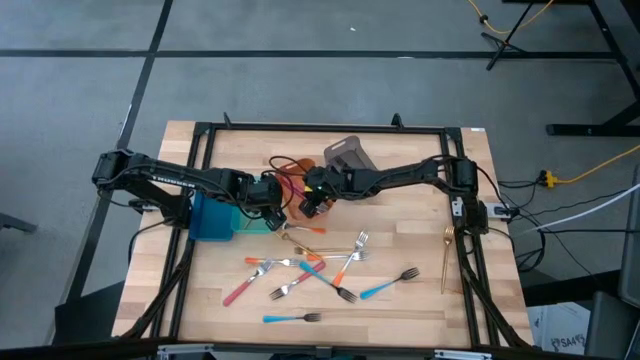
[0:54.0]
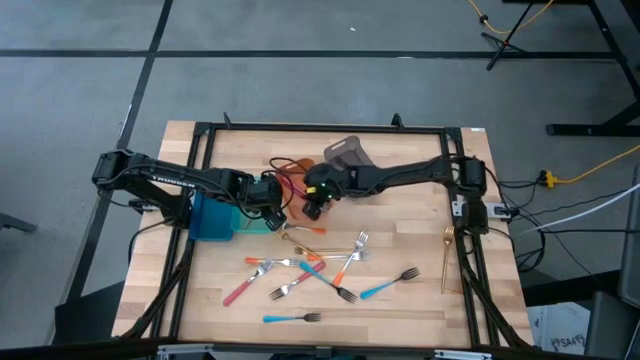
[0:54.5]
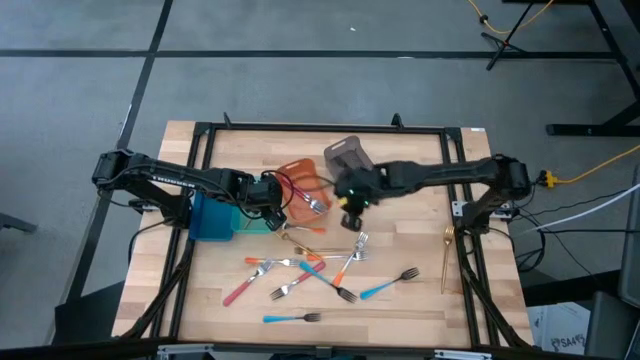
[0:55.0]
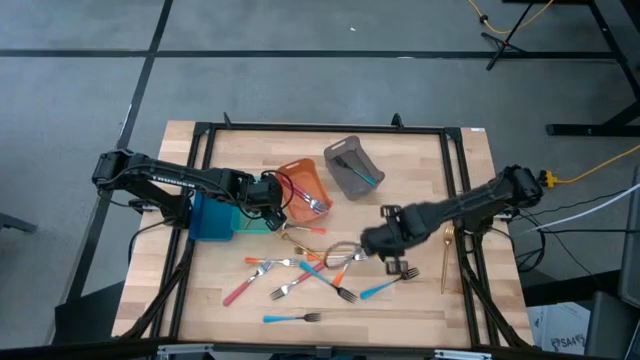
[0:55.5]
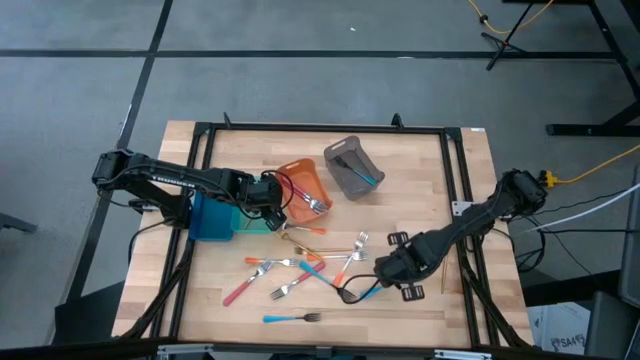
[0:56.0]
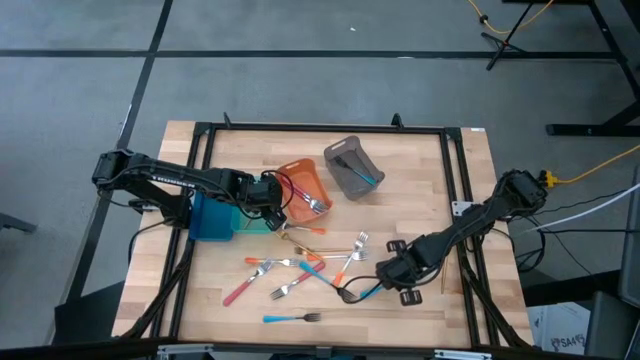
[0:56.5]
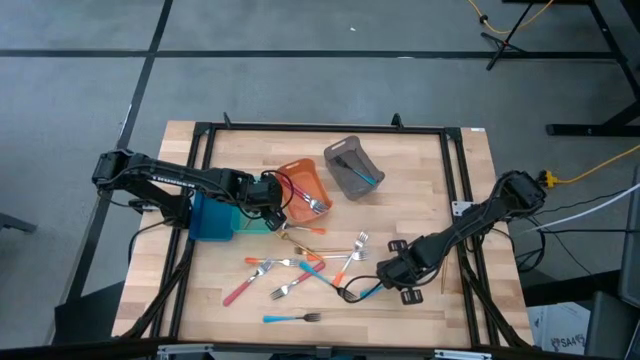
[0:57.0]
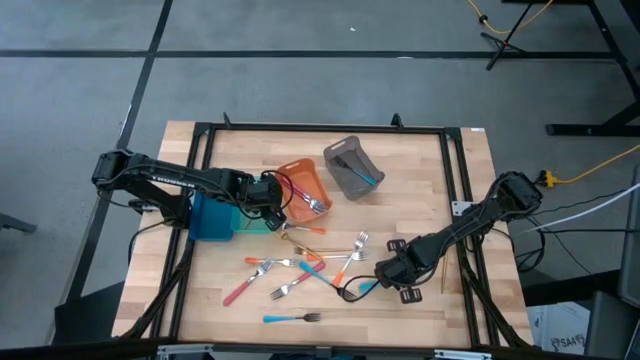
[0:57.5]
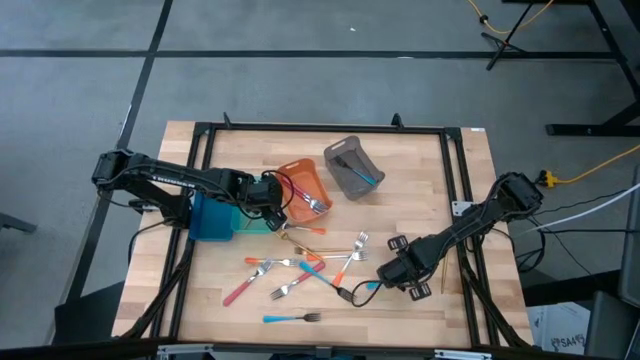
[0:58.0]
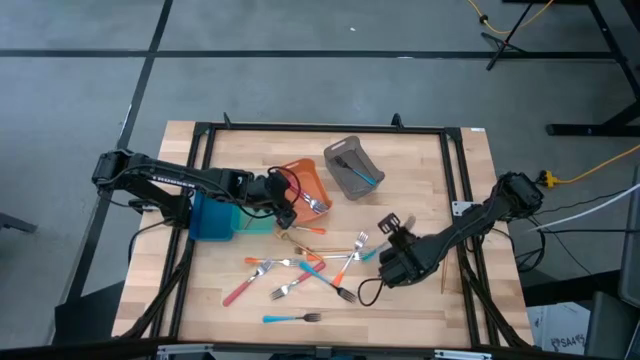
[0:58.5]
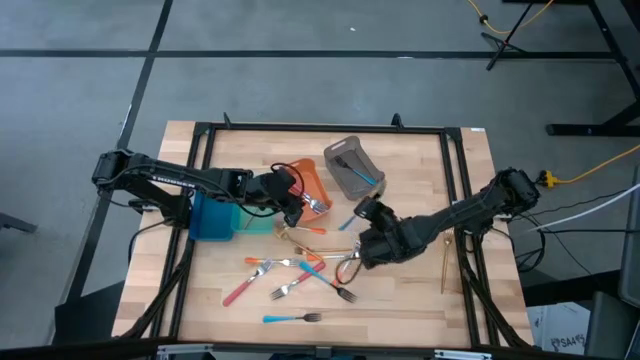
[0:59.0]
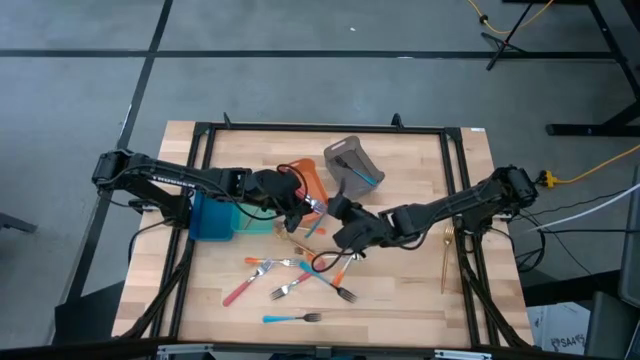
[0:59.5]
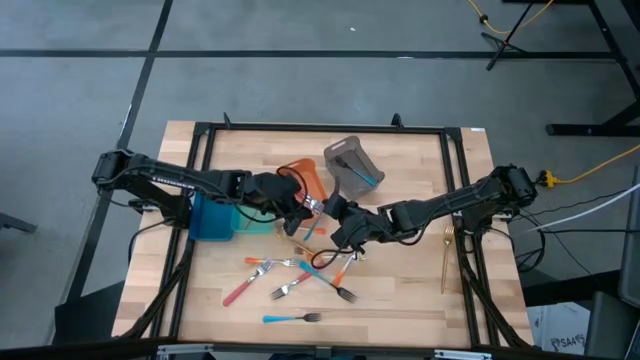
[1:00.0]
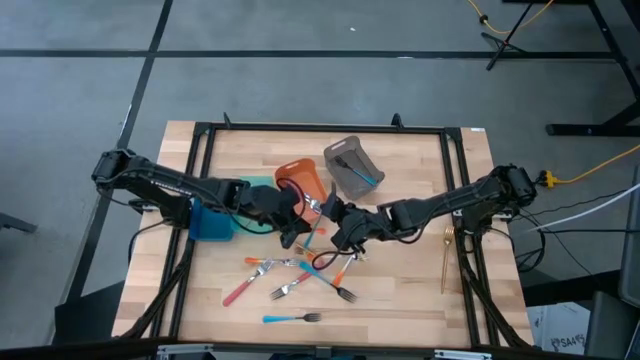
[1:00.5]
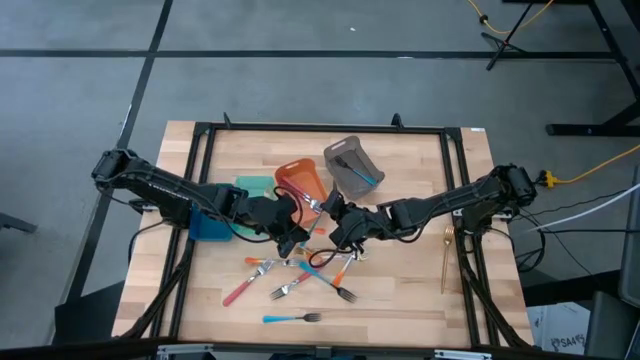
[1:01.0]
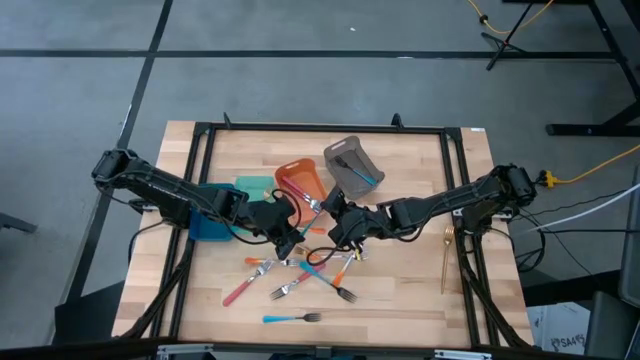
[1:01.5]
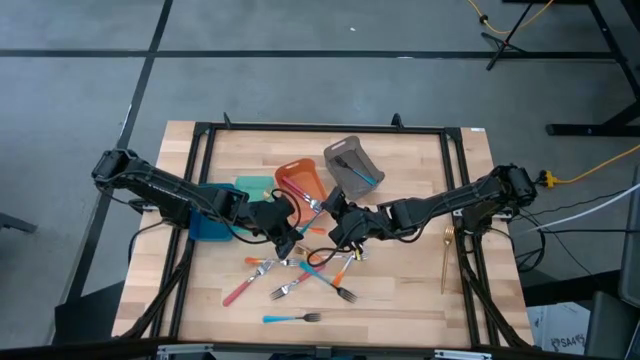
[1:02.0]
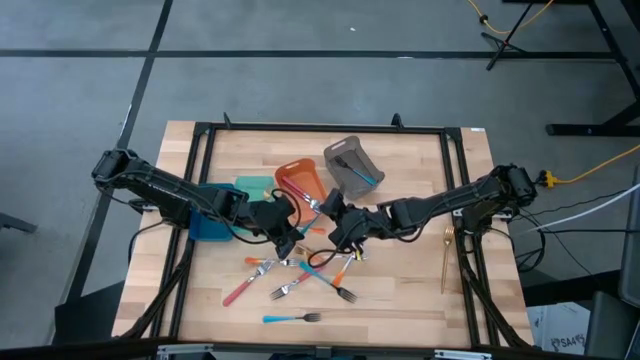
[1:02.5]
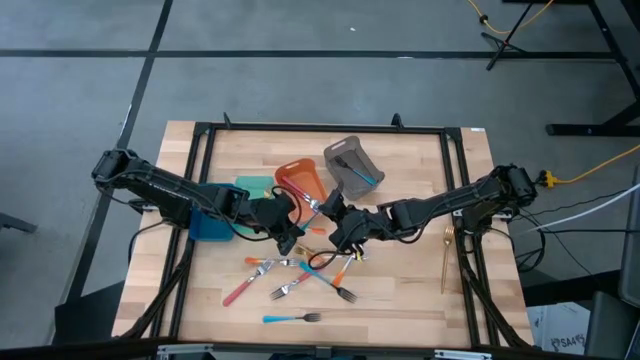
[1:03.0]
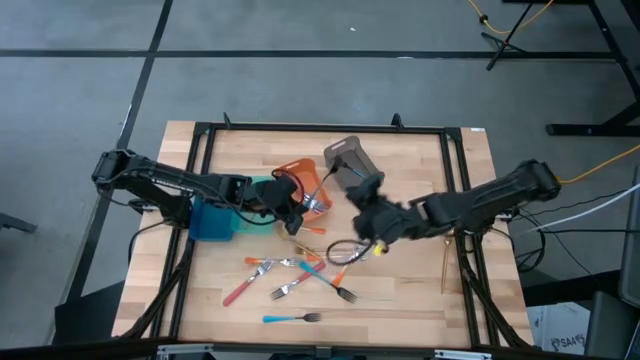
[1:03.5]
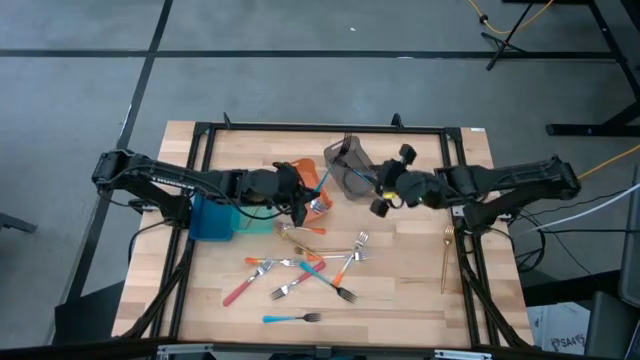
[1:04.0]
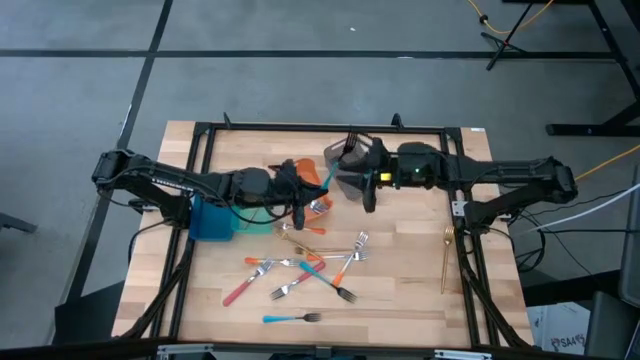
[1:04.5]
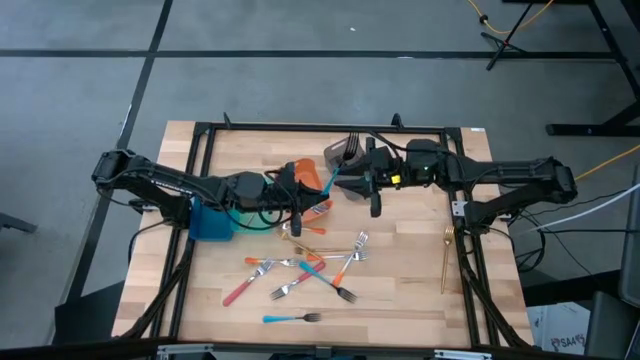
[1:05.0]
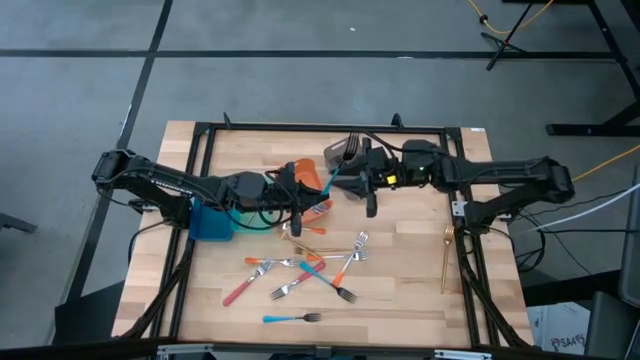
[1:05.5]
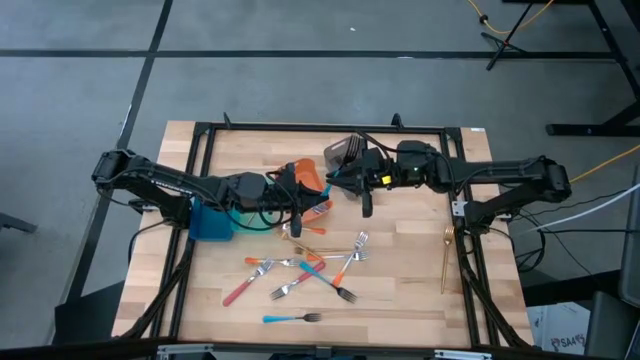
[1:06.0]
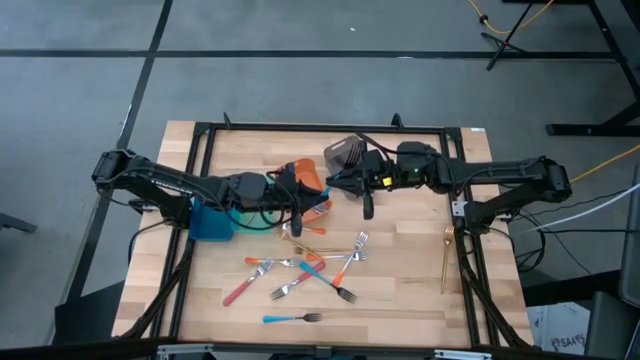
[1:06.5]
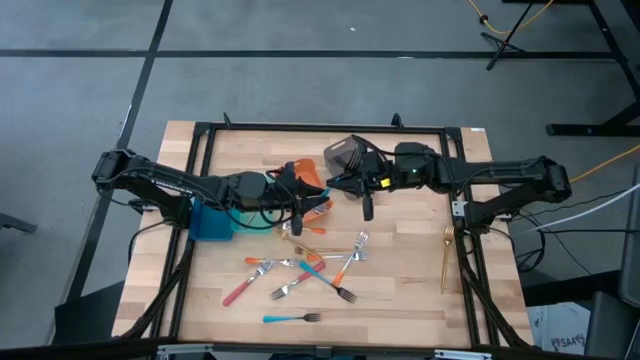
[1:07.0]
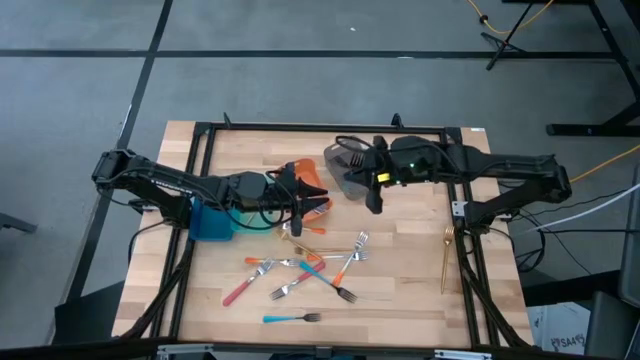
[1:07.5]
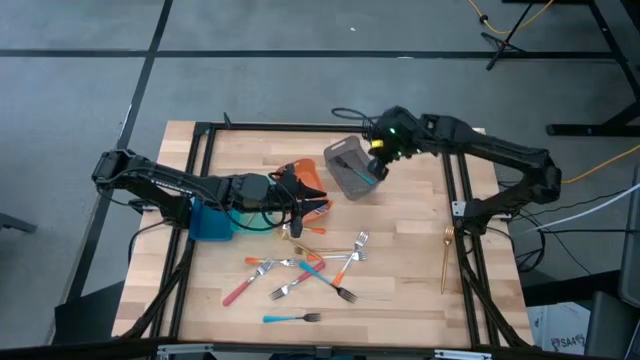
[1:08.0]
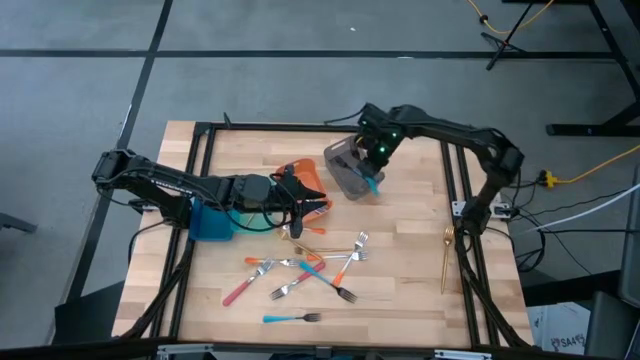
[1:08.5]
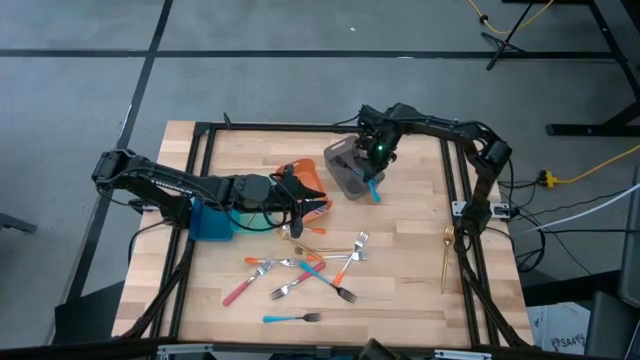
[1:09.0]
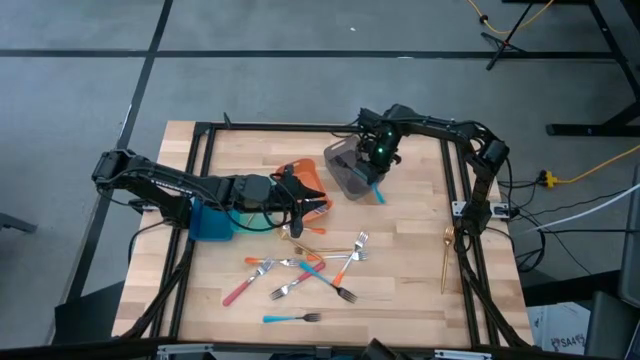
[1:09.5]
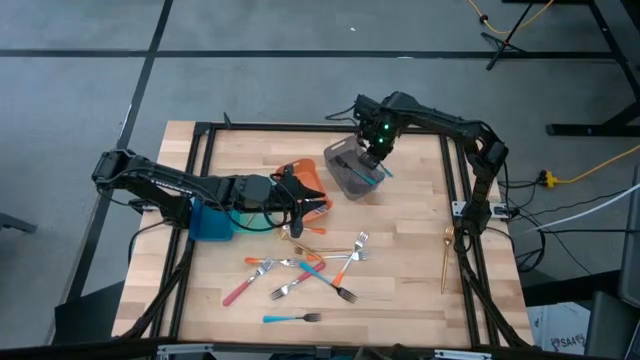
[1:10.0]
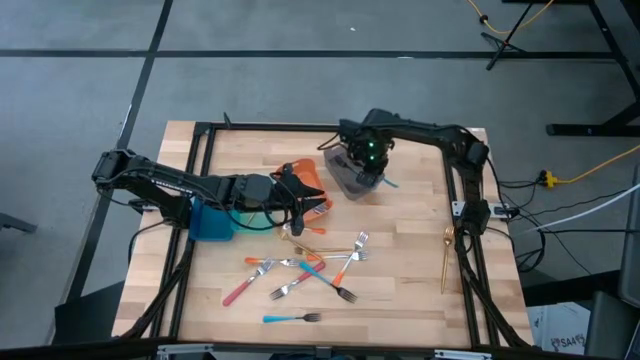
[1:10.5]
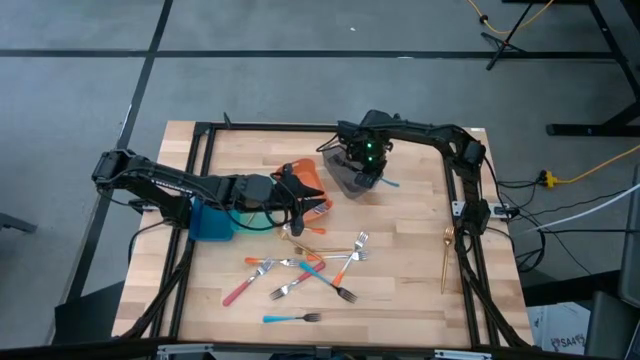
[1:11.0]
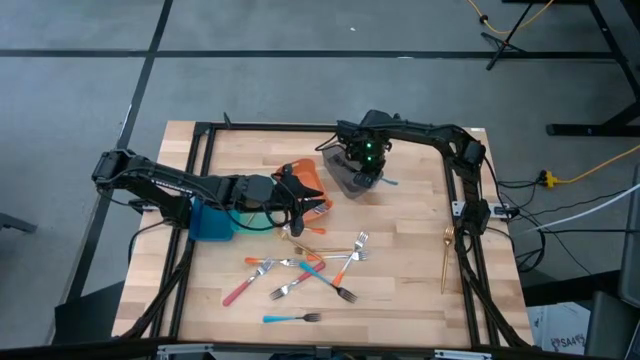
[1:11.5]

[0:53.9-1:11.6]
Task: Sort silverware by color (type)
Put the blue fork into the black bin

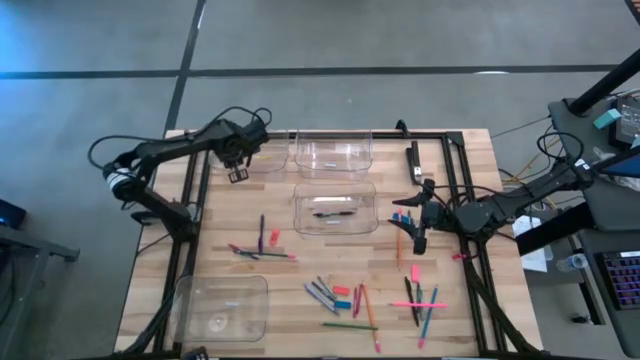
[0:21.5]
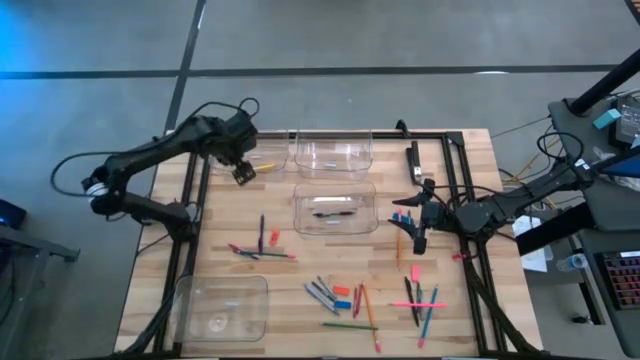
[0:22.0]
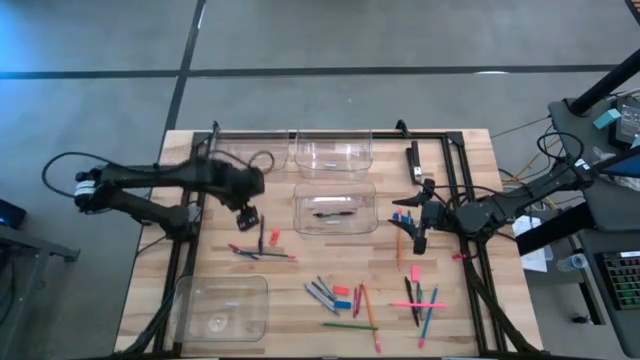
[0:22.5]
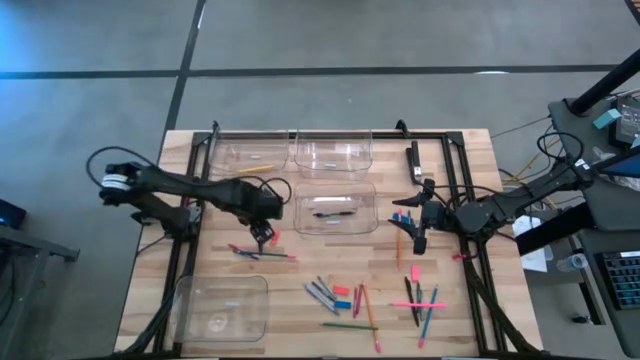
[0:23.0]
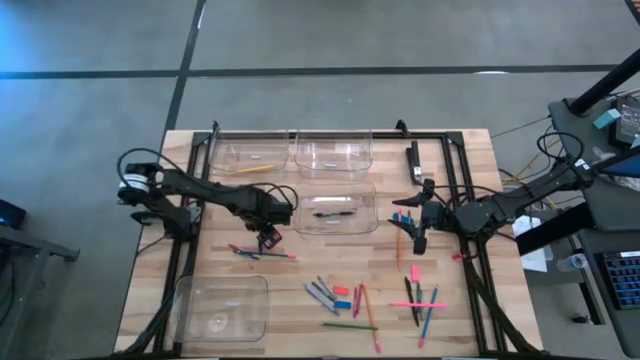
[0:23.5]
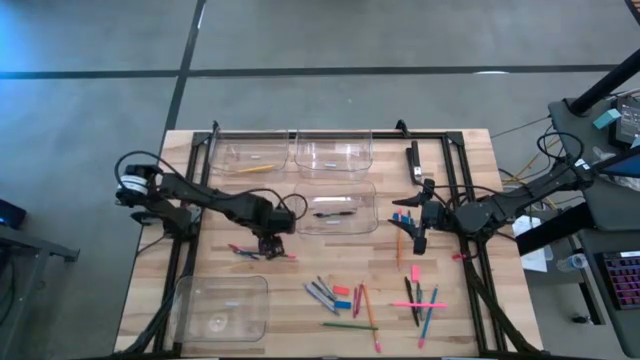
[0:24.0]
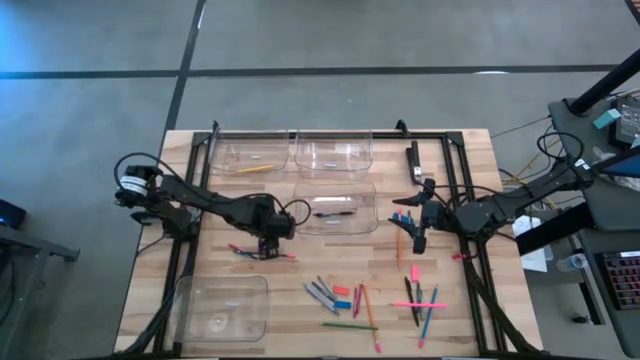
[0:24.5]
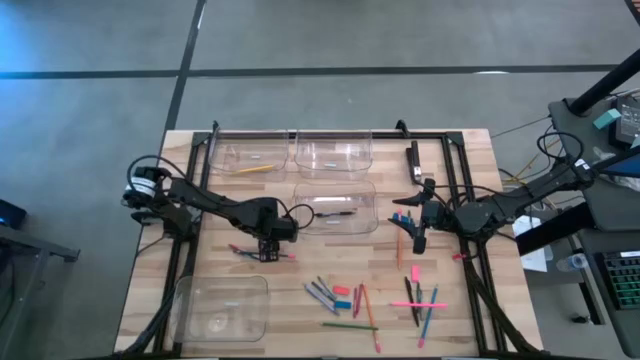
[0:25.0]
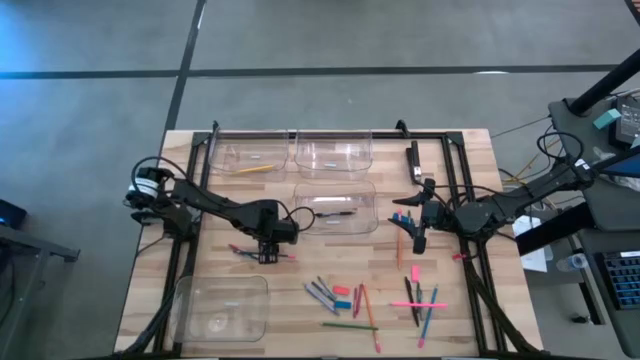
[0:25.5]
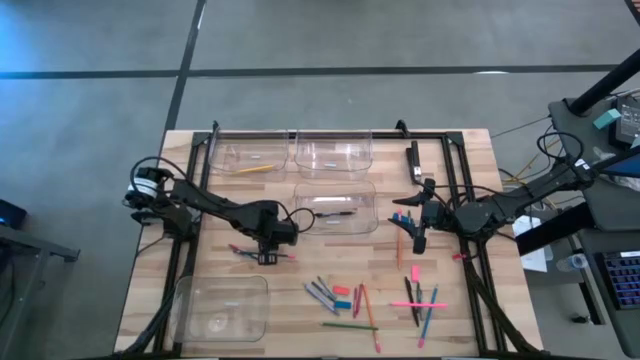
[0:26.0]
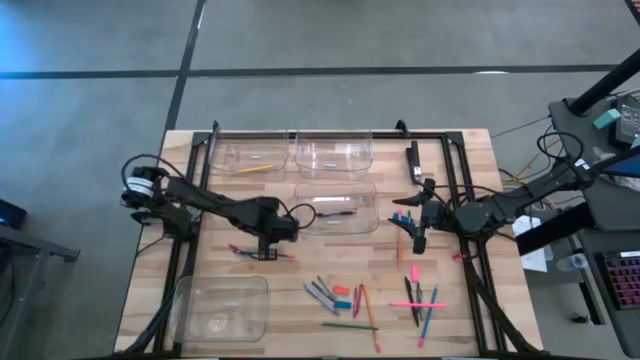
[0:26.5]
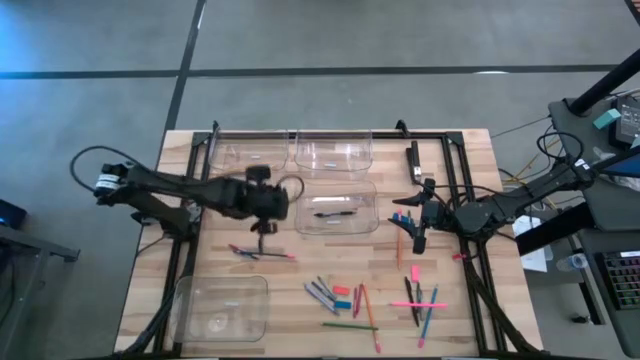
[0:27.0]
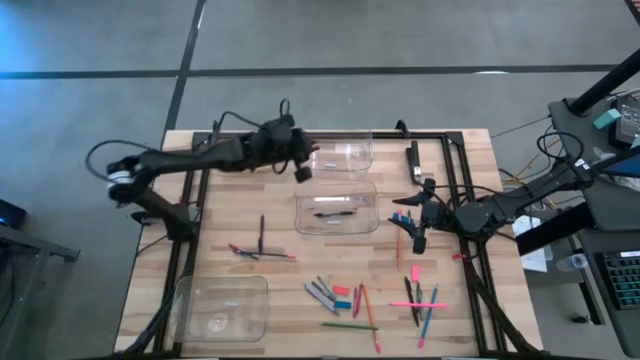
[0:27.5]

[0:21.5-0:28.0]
Task: Sort crayons/erasers/pens/pencils in bins
Put the left orange eraser into the top right transparent bin
